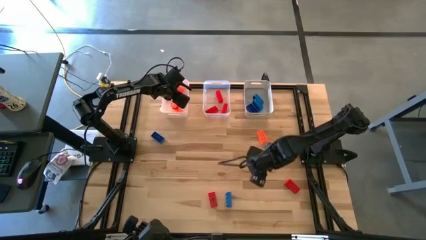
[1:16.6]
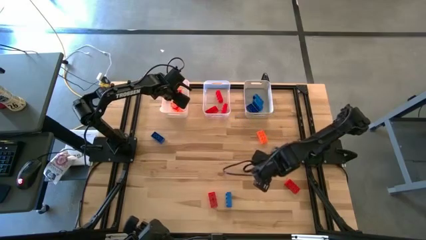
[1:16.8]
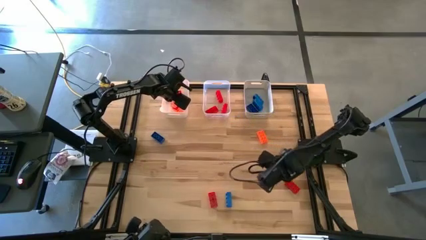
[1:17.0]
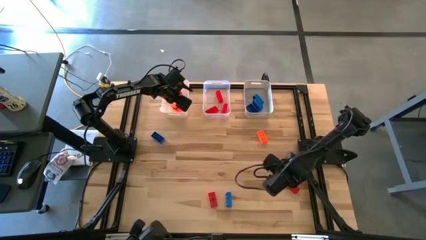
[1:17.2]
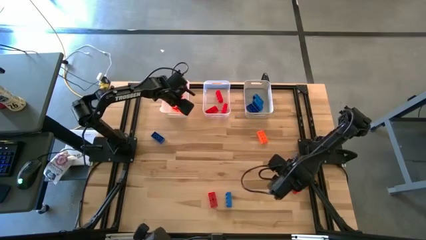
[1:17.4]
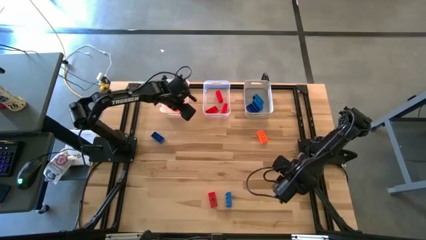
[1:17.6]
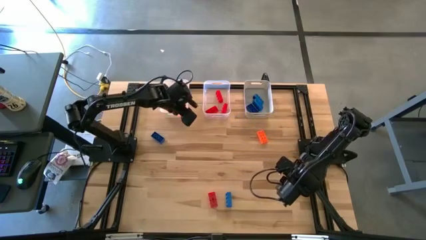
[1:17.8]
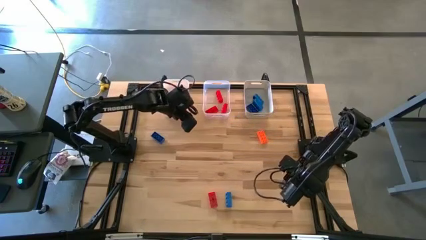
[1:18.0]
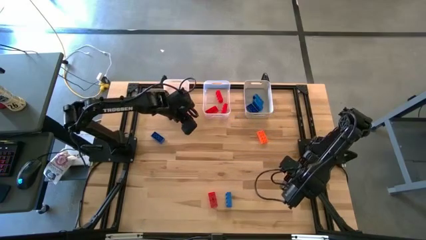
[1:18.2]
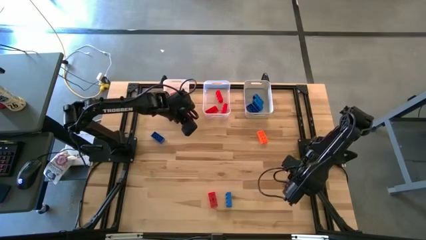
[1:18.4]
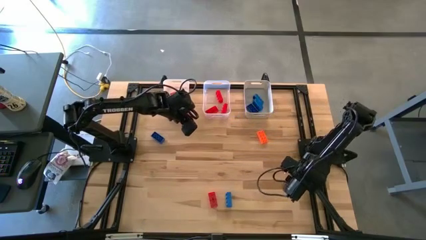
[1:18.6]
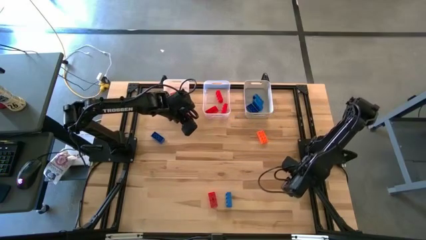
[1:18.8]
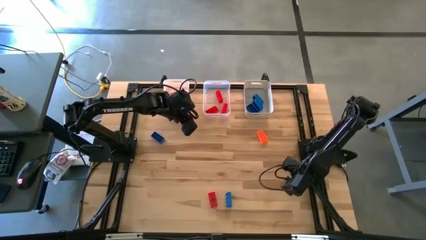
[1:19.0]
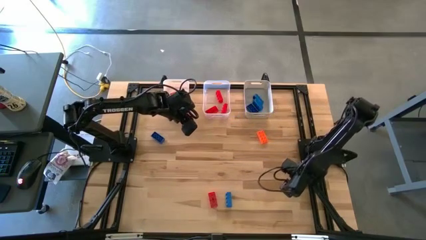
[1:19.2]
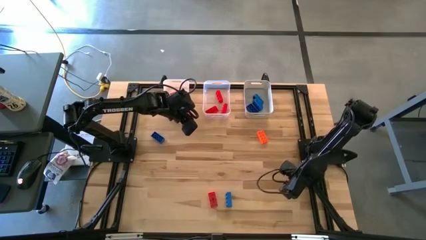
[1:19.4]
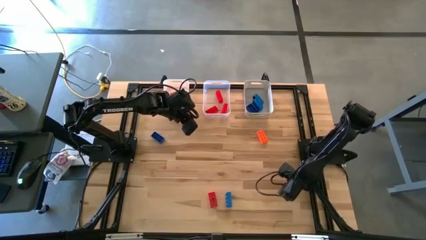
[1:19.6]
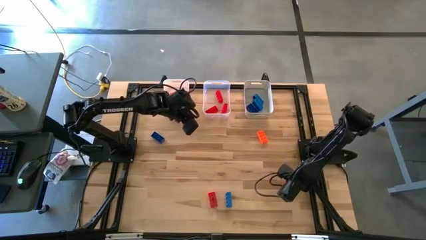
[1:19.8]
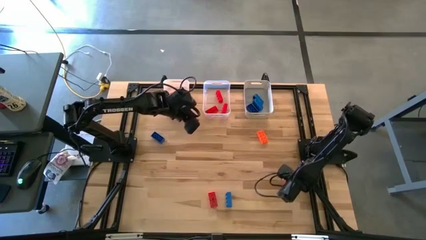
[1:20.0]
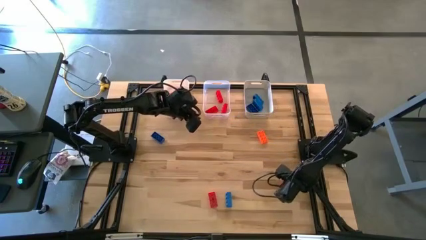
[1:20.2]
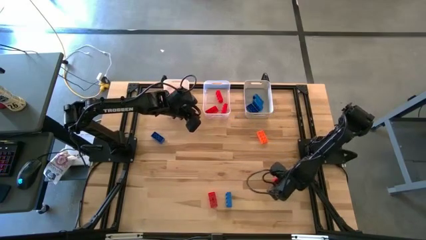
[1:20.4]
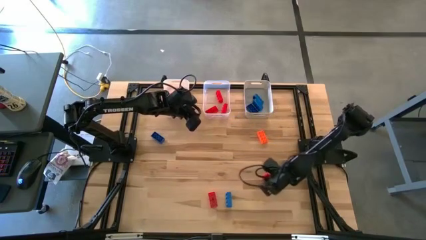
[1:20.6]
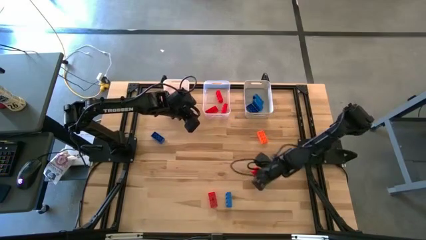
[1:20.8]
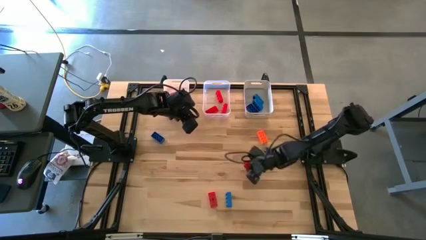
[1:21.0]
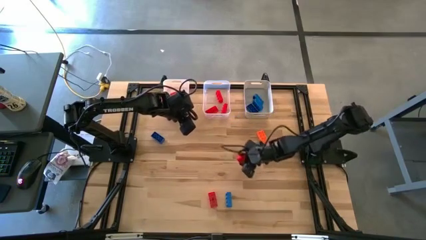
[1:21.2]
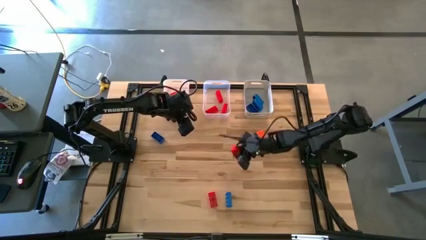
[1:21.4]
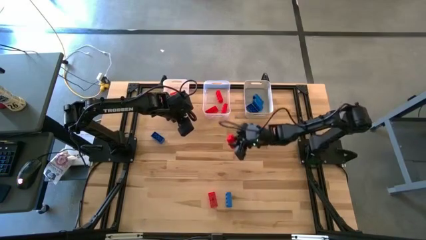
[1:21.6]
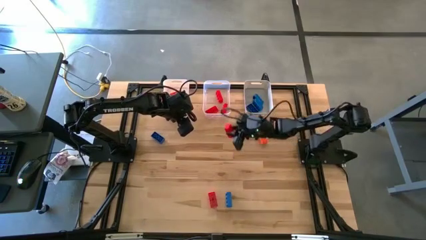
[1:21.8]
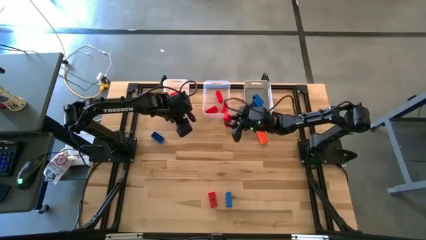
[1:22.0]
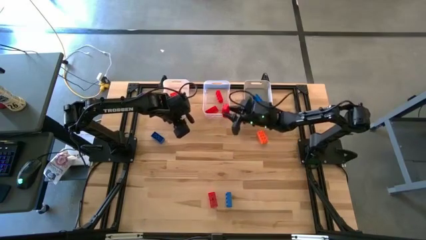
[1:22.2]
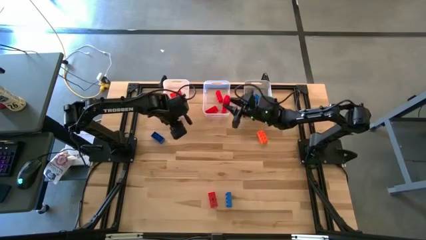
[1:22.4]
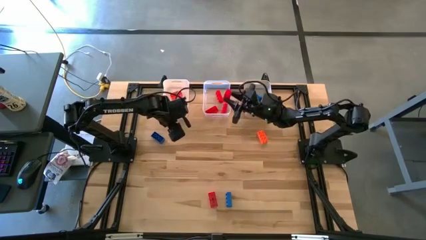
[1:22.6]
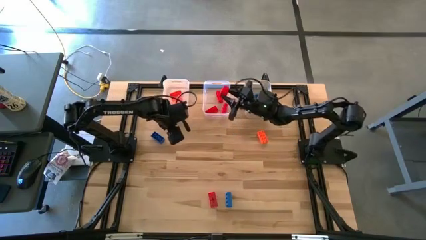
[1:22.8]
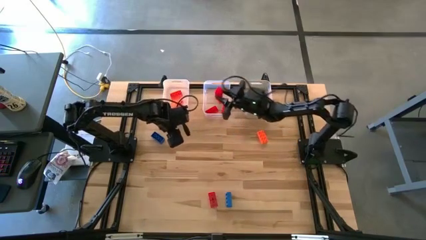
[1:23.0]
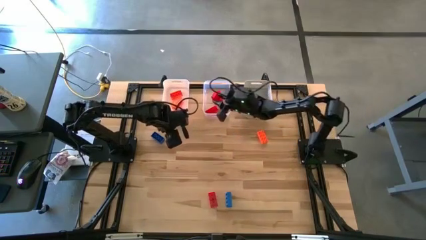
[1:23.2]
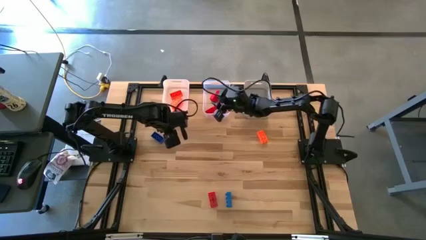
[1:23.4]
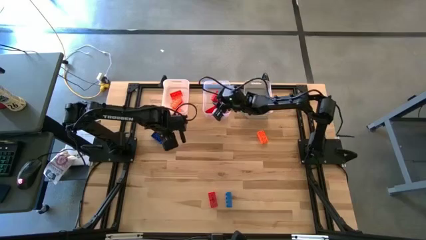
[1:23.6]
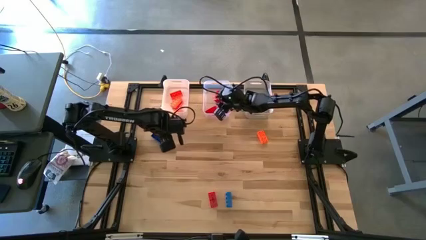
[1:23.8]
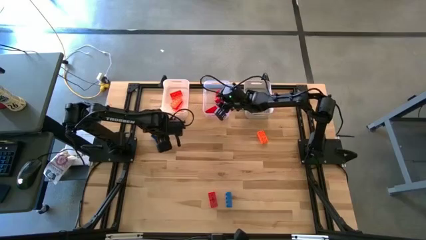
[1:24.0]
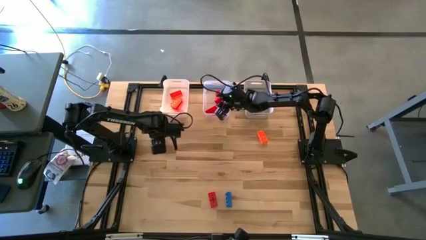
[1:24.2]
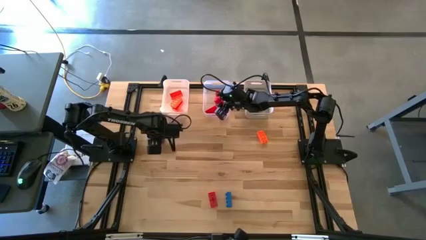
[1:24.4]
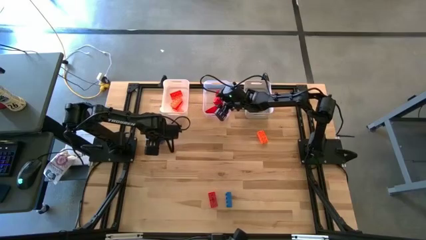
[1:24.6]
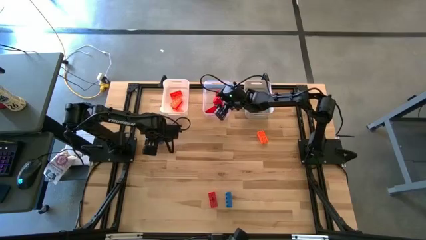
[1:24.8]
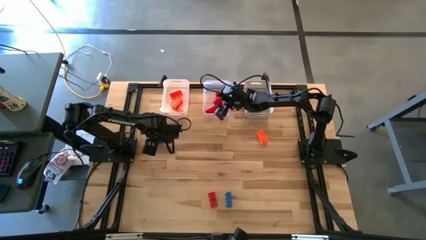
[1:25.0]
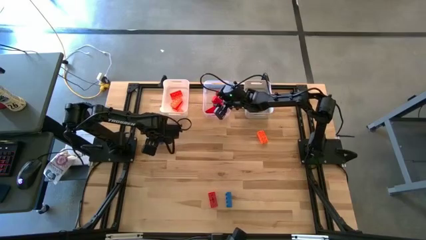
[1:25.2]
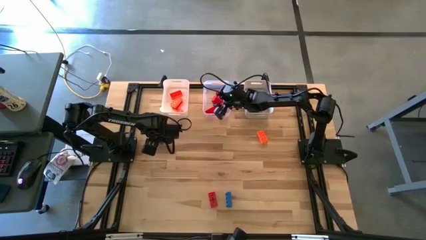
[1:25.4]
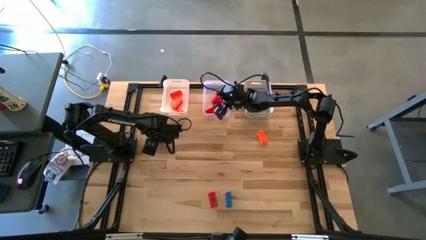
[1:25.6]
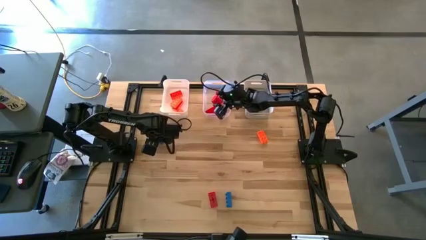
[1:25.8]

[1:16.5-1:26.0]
Task: Sort & place blocks by color
Put the red game piece into the transparent bin

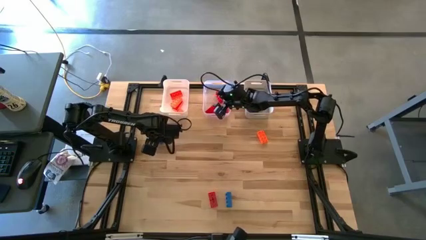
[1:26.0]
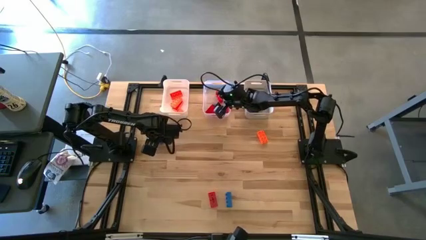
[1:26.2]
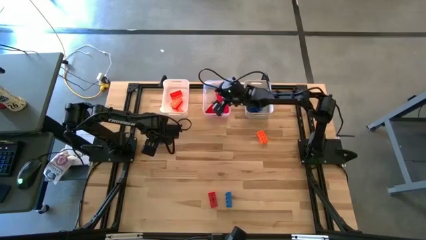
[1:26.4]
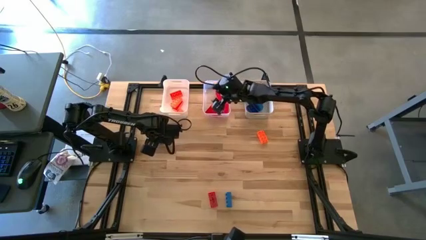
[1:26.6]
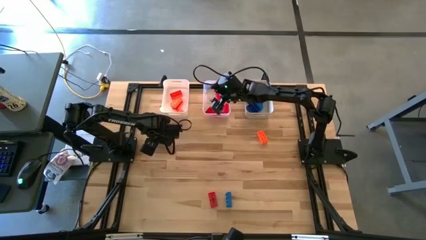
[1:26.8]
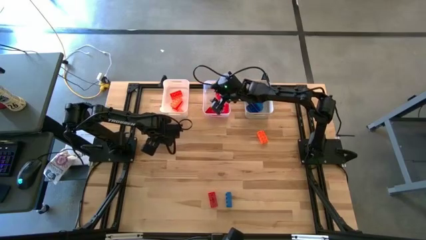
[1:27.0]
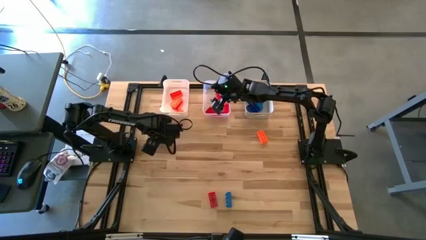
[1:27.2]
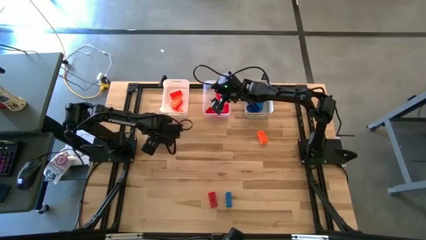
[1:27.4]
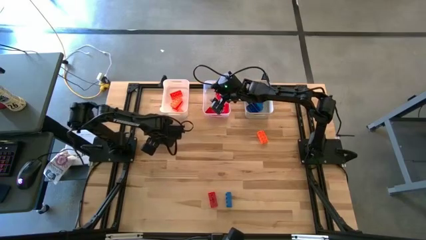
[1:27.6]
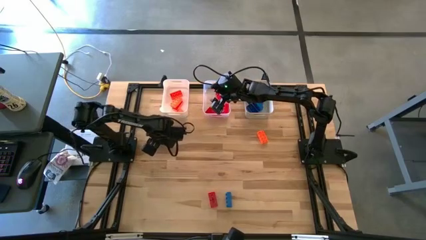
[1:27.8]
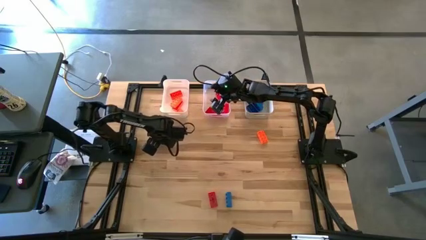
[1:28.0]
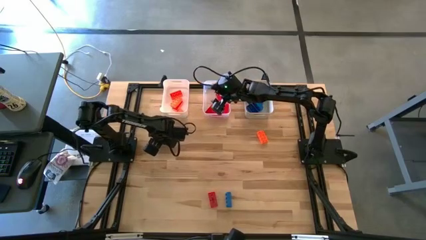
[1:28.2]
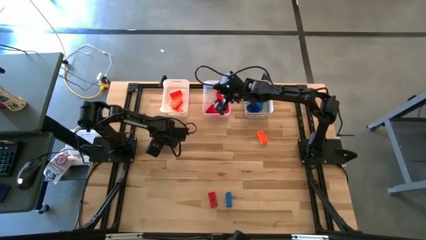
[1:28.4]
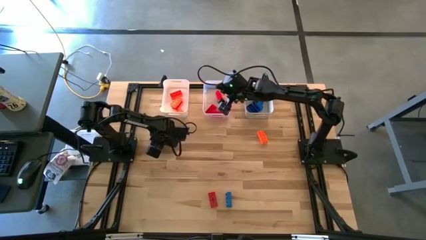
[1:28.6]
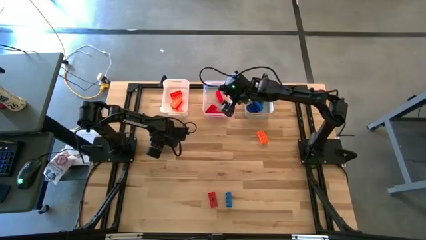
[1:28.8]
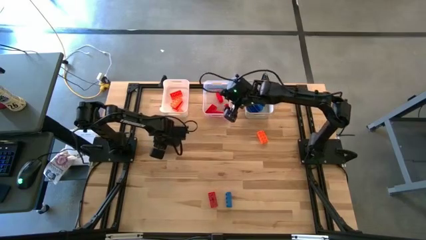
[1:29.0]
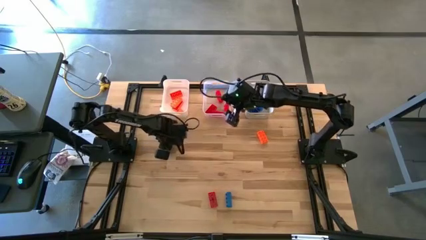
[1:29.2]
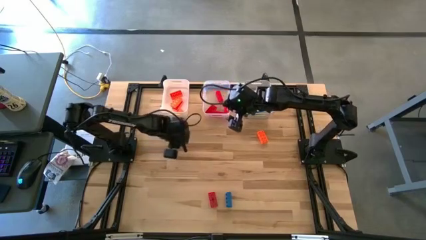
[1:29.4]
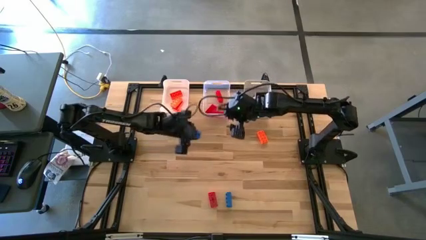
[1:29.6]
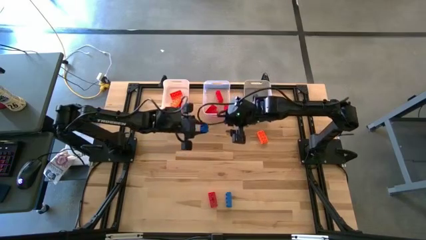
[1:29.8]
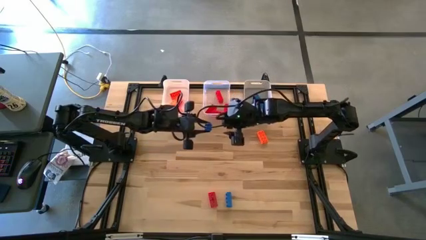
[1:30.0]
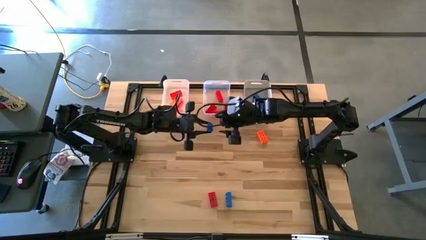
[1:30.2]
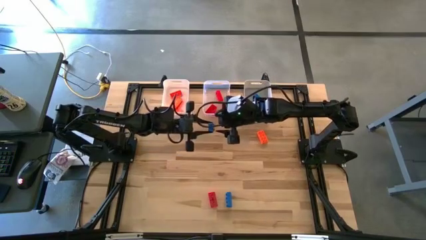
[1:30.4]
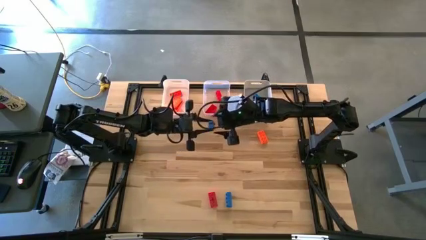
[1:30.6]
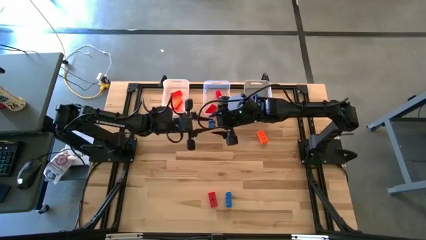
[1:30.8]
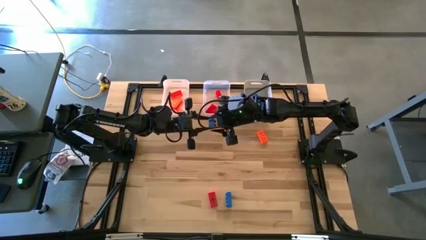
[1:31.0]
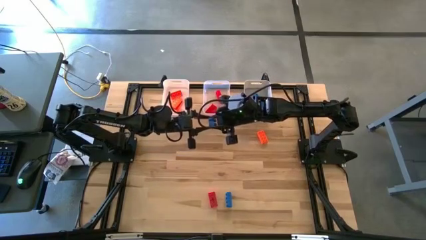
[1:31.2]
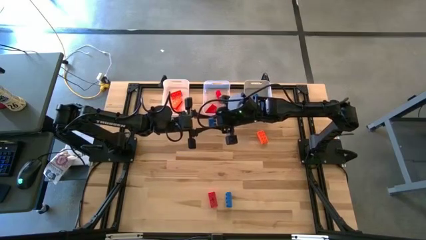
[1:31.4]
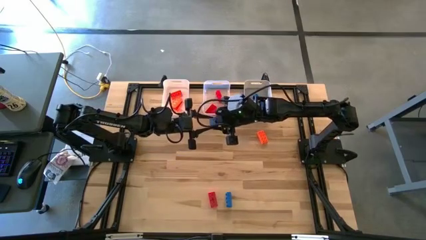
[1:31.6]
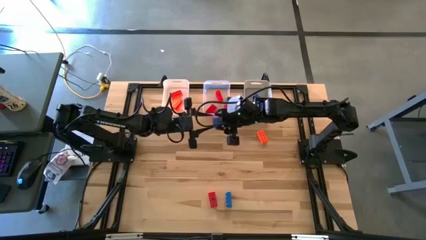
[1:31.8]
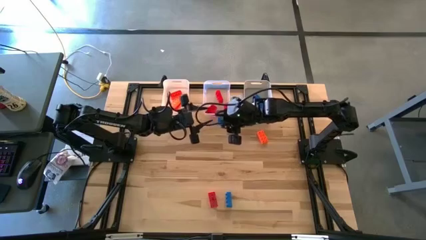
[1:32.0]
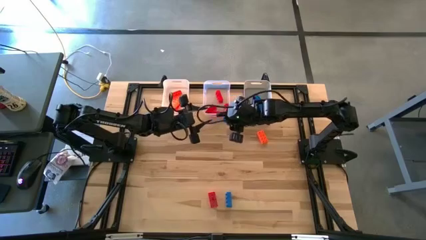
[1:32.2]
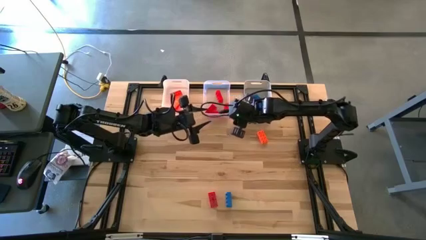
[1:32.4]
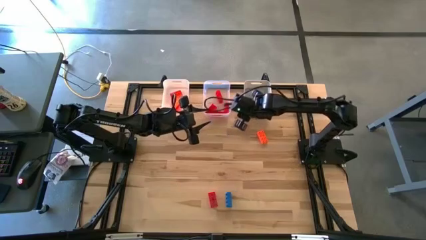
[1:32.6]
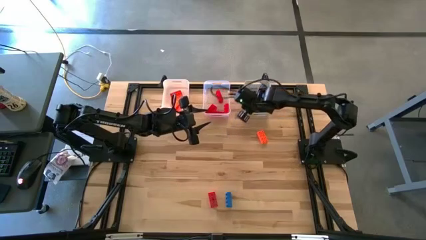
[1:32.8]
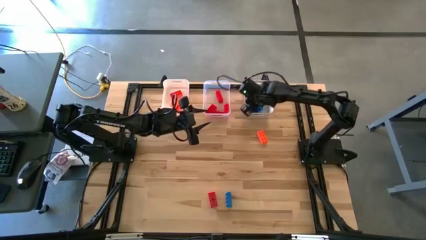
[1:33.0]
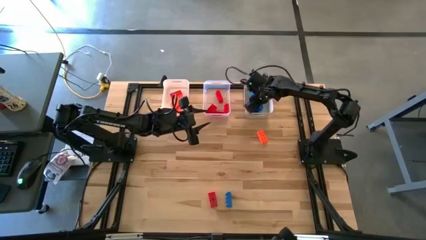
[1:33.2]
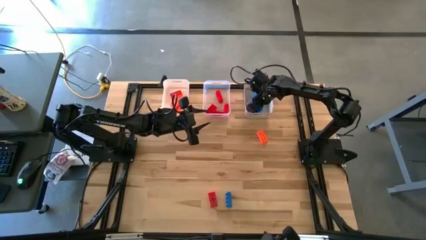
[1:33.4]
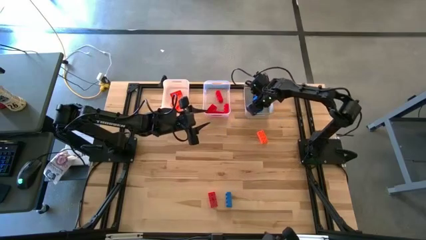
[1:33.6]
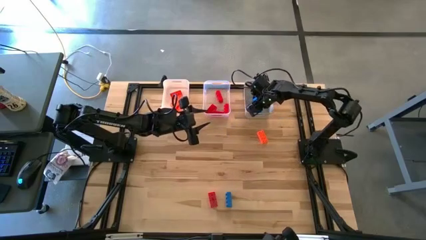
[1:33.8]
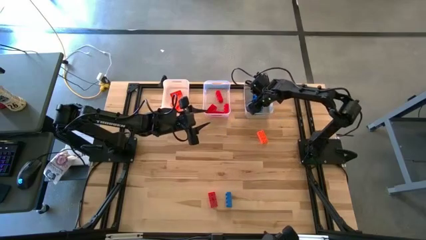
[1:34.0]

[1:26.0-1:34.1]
Put the blue game piece into the gray bin
